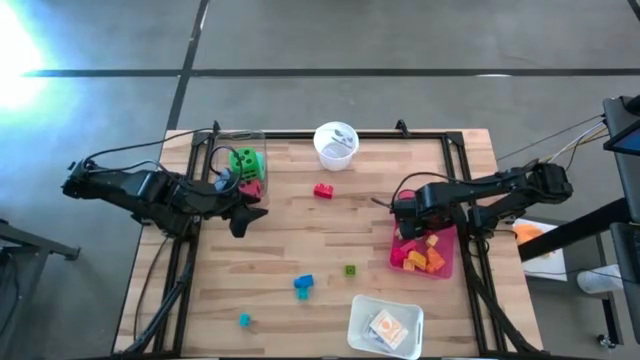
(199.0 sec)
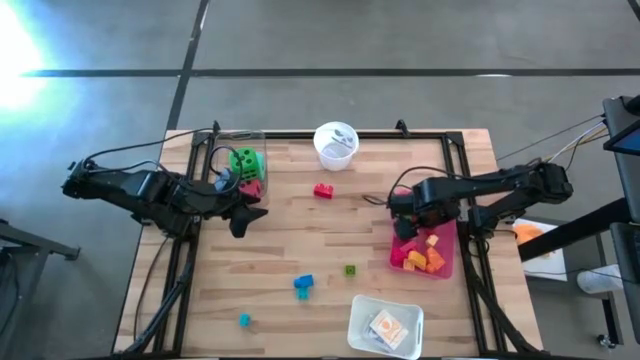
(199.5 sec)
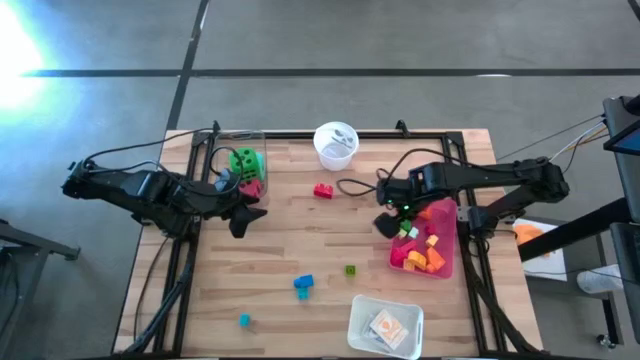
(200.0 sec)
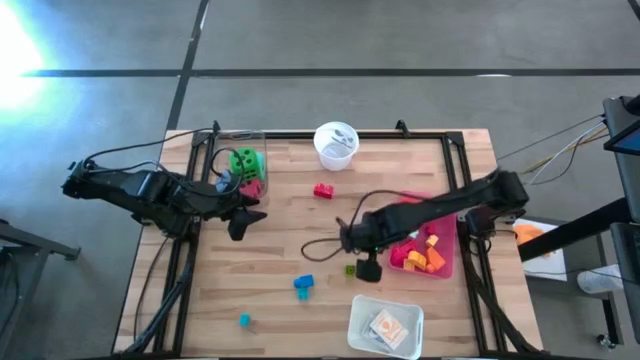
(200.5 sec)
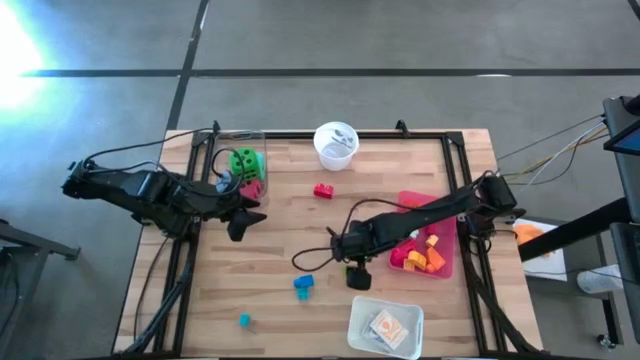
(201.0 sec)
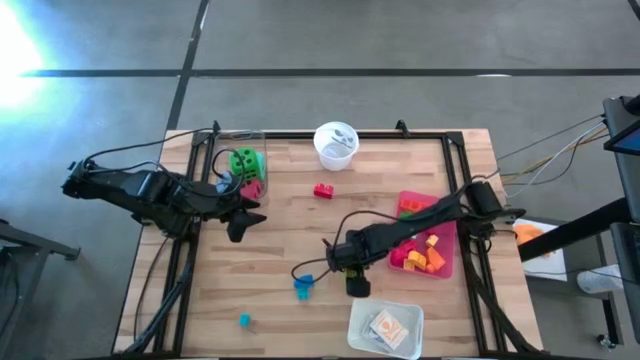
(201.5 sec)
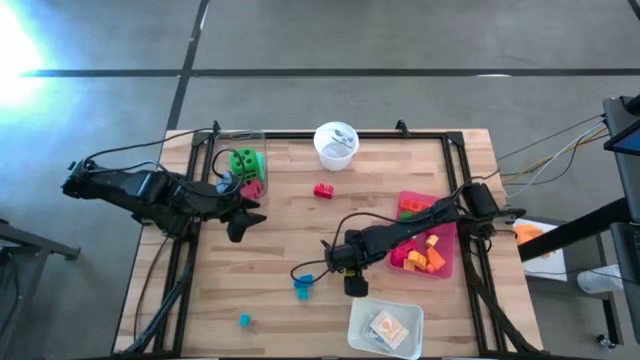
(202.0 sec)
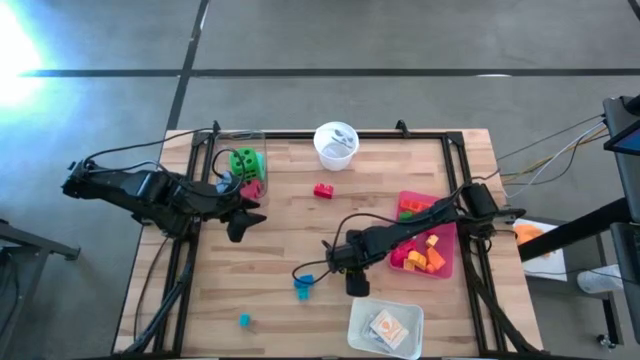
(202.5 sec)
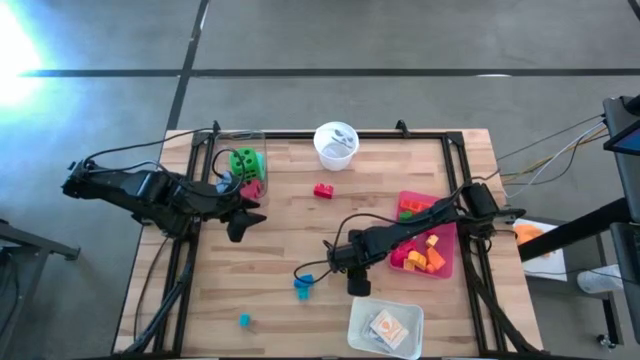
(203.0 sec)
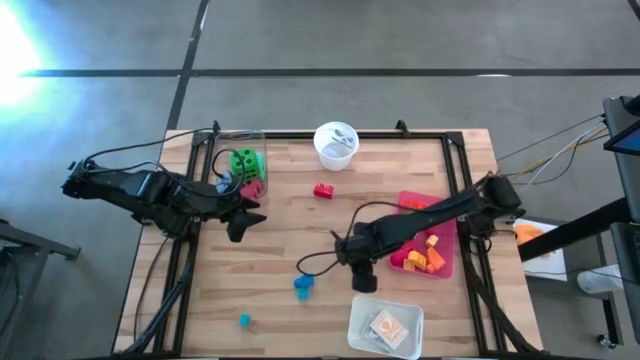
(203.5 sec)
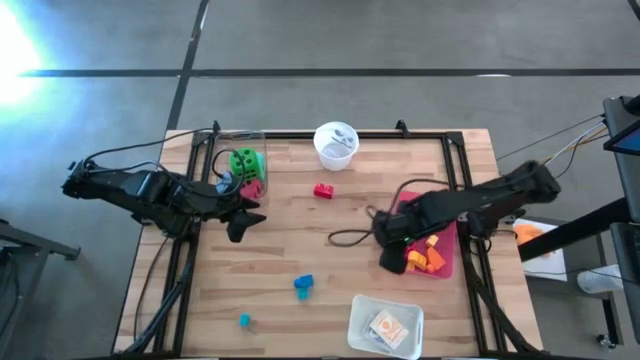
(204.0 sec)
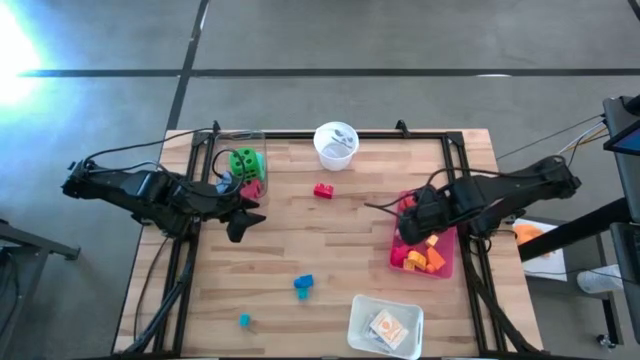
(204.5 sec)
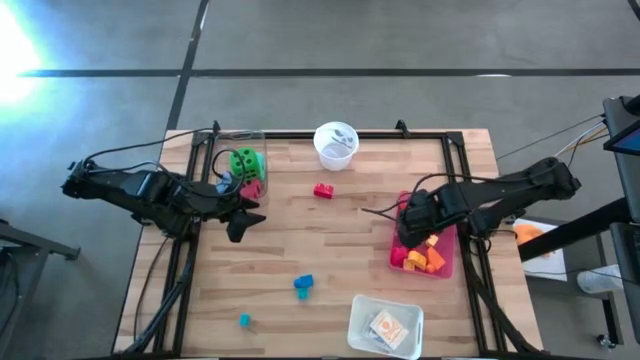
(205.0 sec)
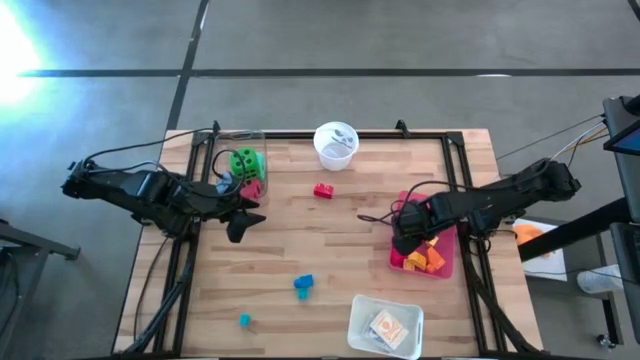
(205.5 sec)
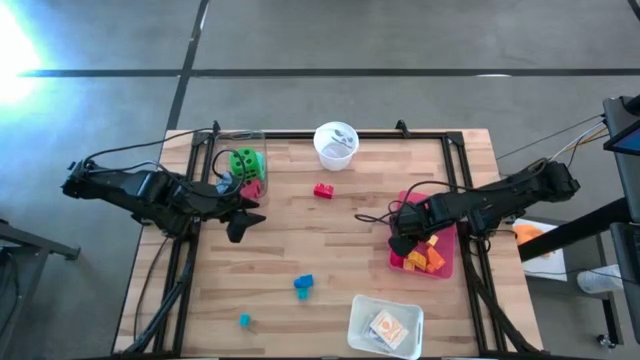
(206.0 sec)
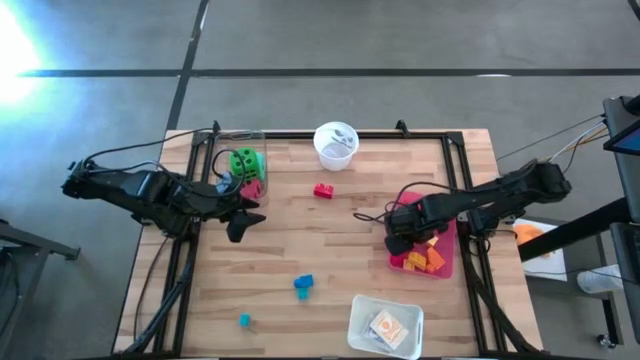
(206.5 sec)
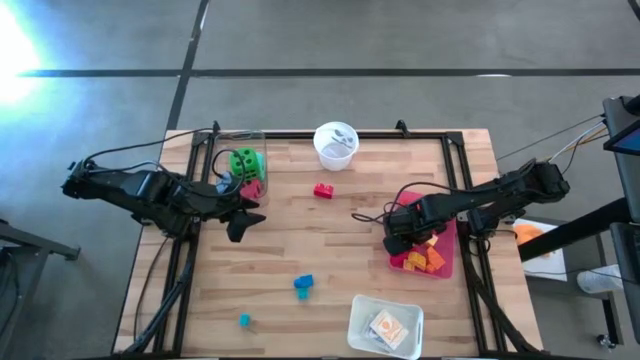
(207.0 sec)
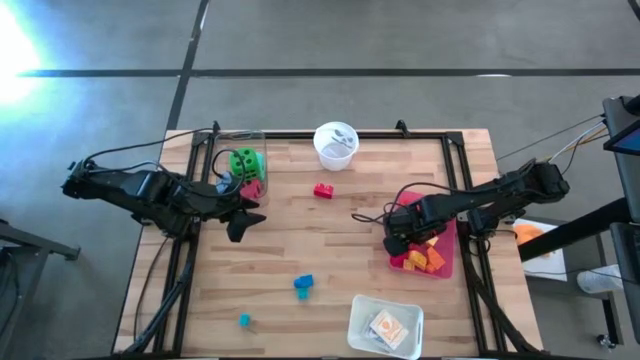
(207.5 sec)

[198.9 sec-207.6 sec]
Task: Pick & Place Toys
Put the light green game piece into the pink bin

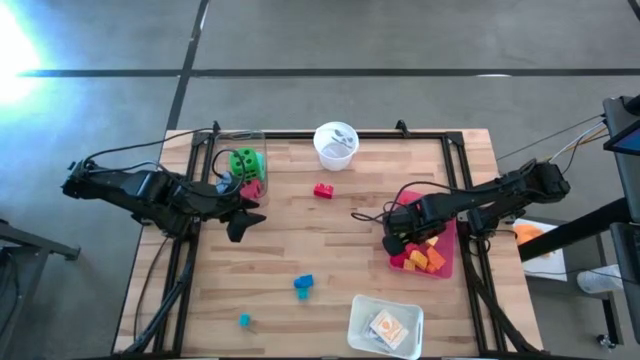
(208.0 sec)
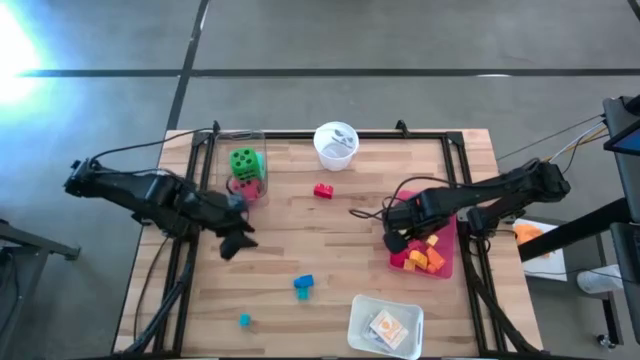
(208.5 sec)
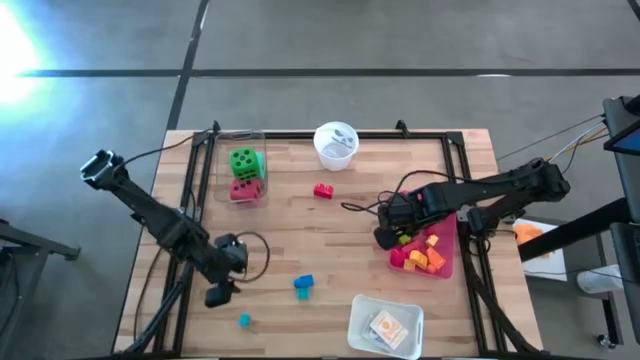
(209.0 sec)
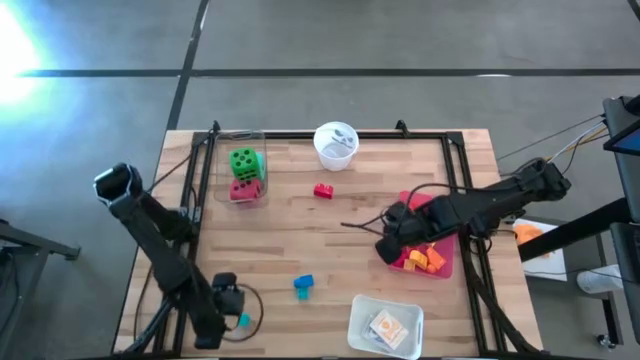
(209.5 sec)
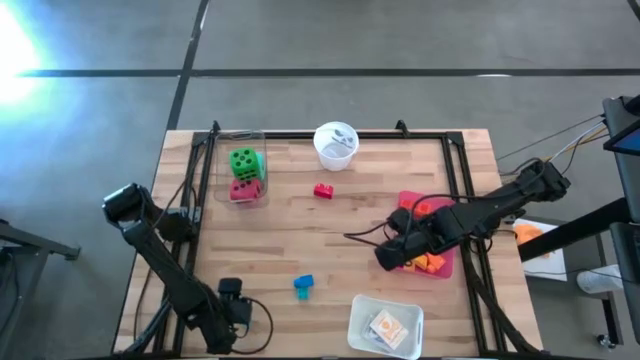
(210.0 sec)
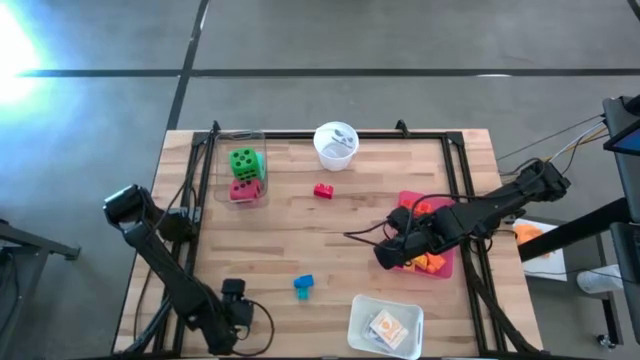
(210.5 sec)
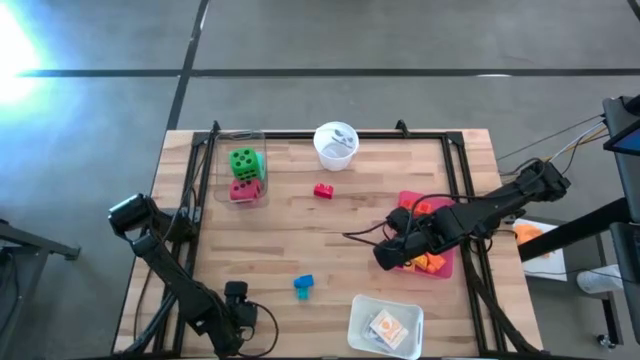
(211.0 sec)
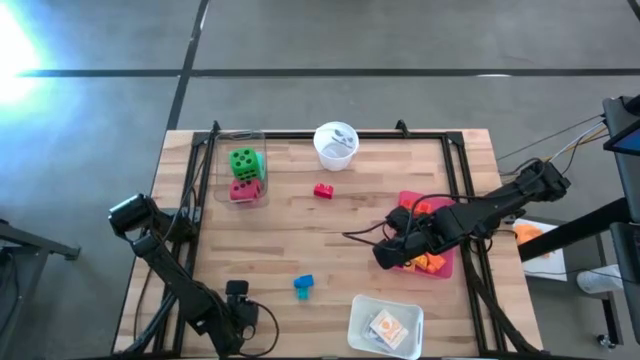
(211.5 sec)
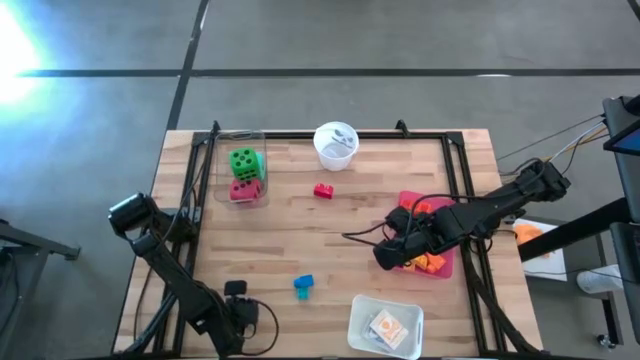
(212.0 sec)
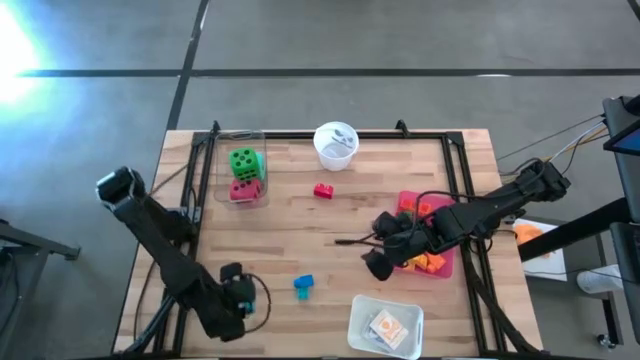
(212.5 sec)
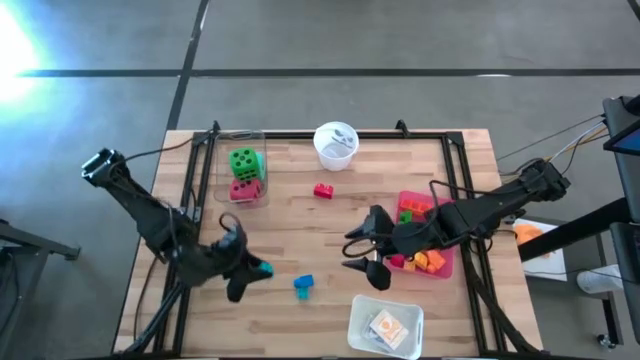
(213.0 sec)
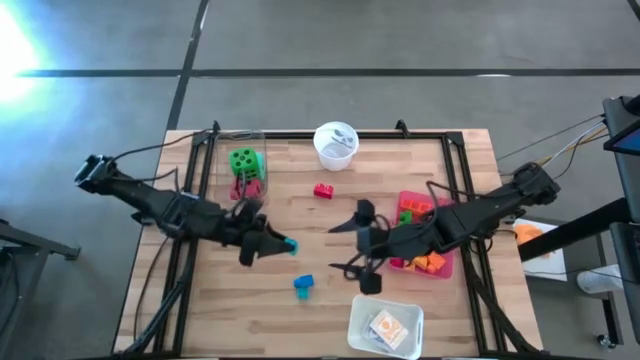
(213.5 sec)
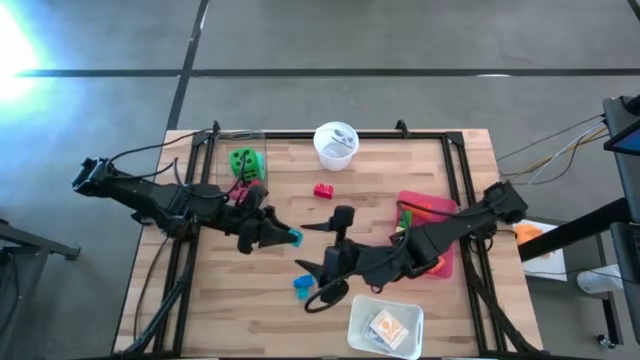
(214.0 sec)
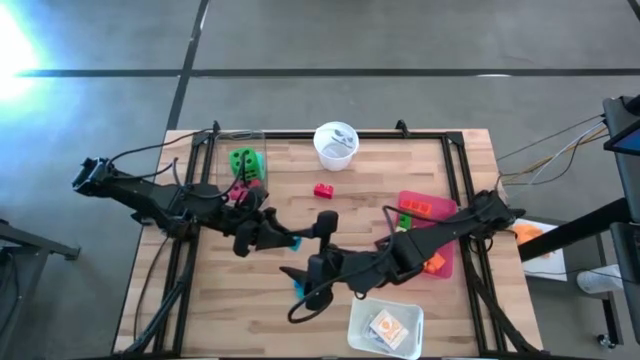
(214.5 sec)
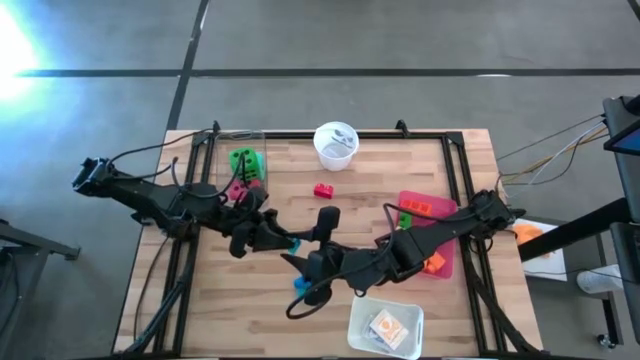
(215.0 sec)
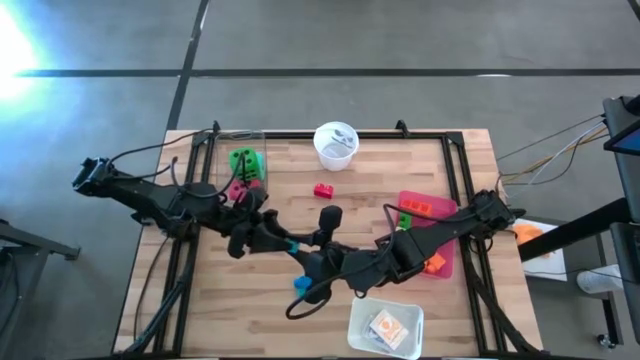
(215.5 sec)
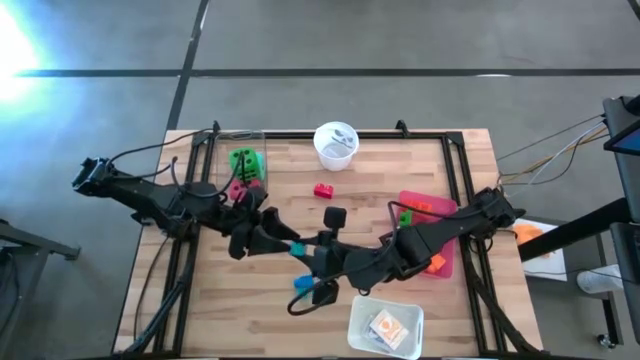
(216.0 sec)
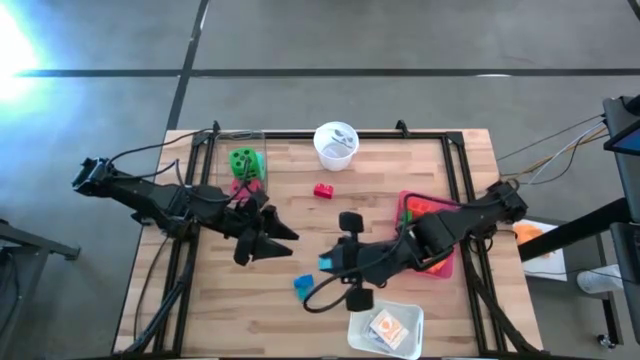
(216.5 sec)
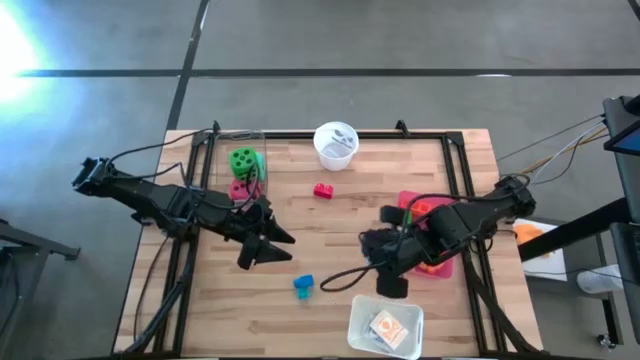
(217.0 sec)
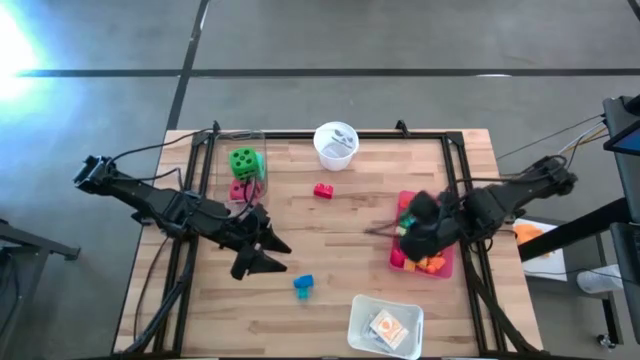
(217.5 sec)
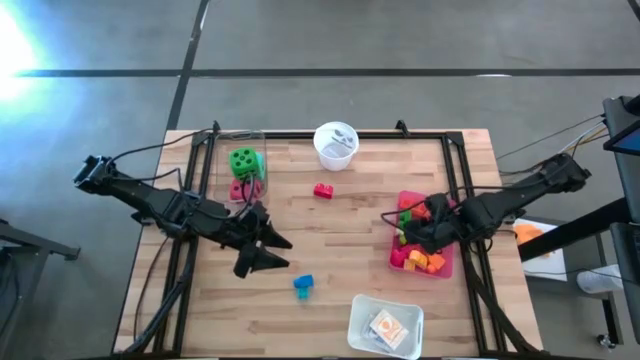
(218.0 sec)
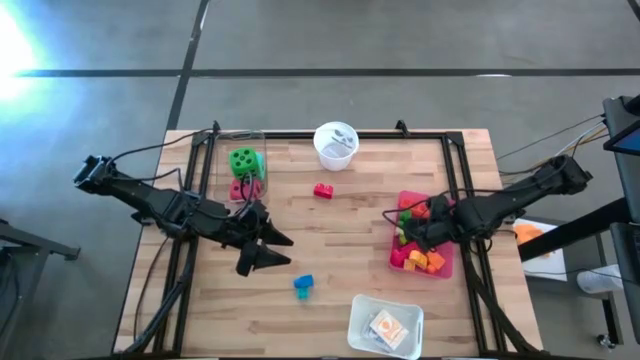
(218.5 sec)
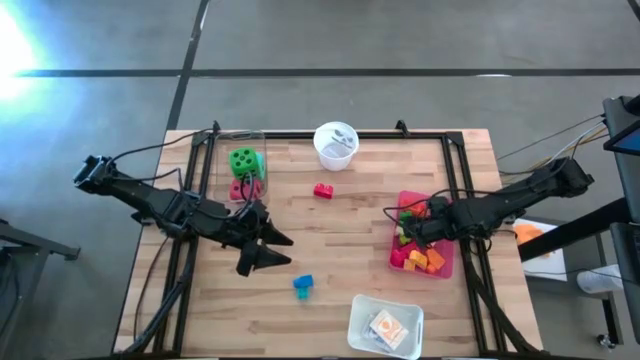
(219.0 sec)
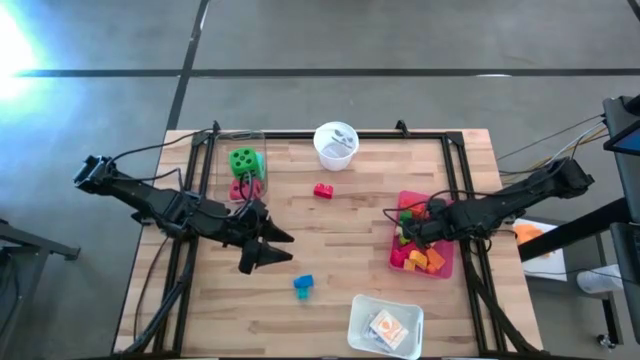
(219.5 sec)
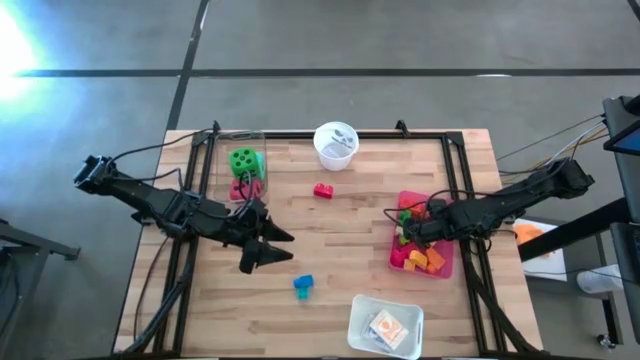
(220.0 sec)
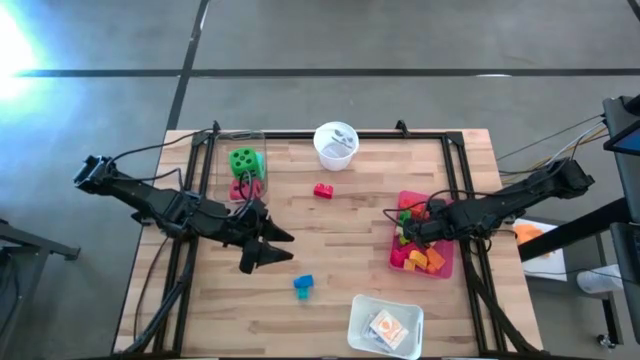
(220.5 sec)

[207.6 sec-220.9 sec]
Put the light blue game piece into the pink bin

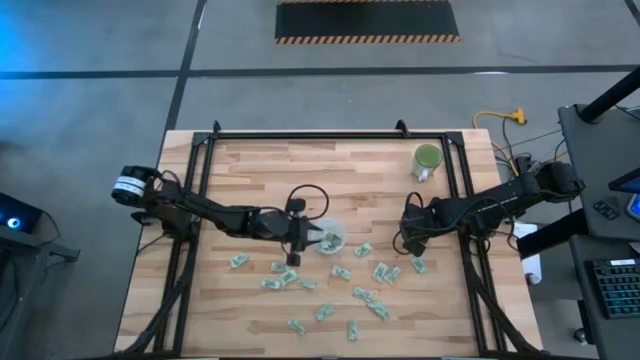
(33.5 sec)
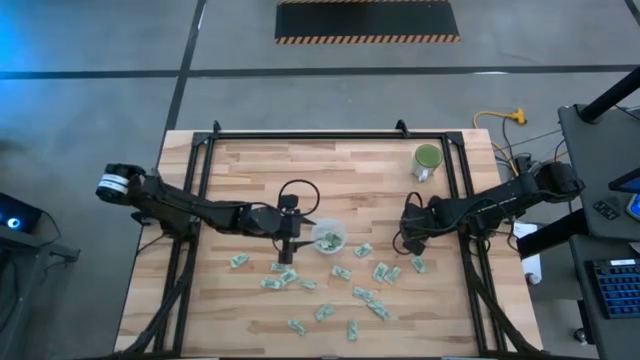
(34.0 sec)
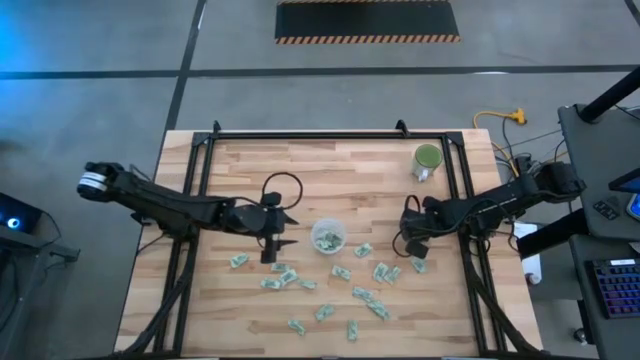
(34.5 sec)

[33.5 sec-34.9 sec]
Task: Pick and place Stevia / Truvia into bins
Put the light green stevia packet into the transparent container
